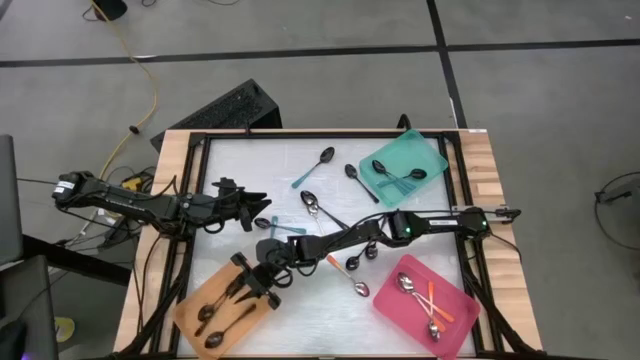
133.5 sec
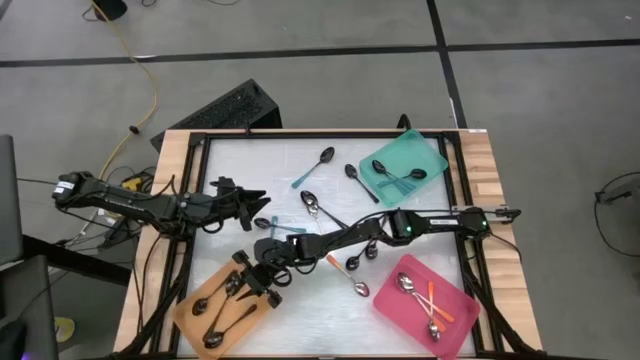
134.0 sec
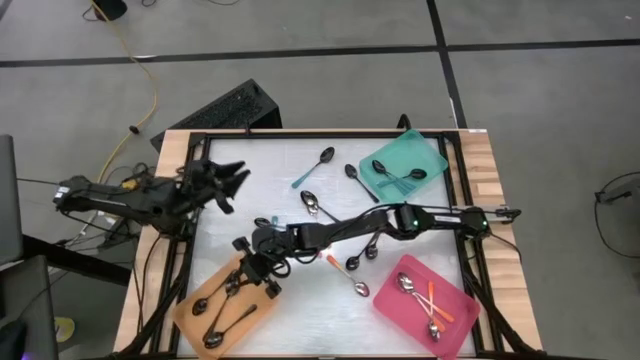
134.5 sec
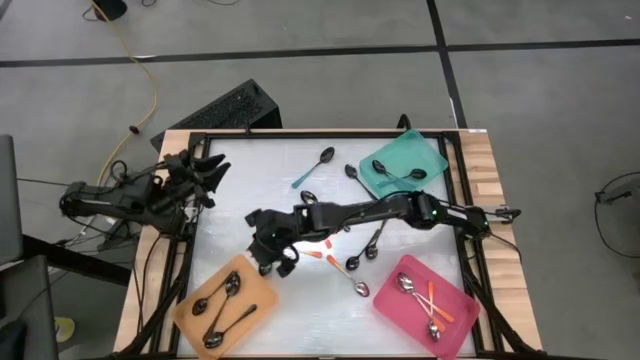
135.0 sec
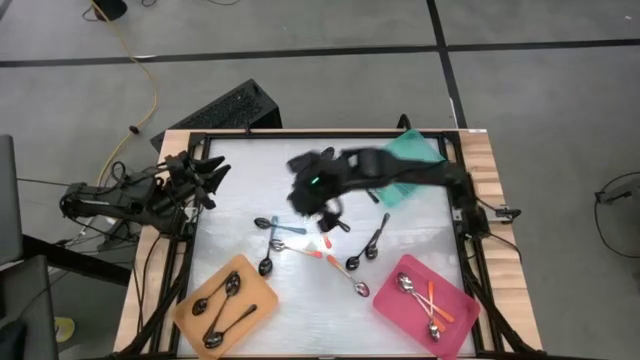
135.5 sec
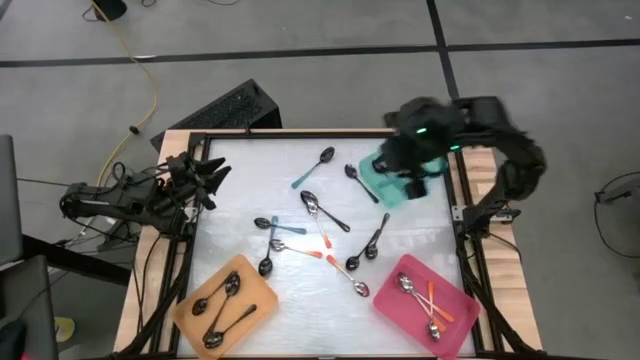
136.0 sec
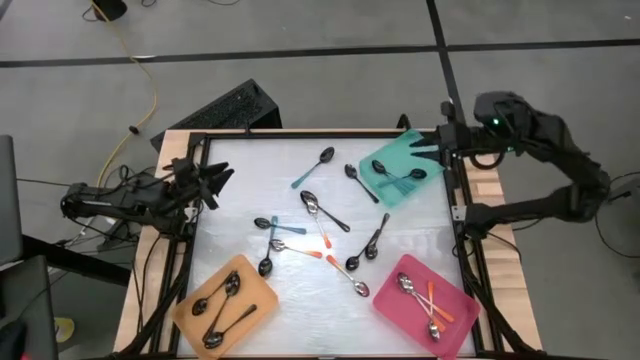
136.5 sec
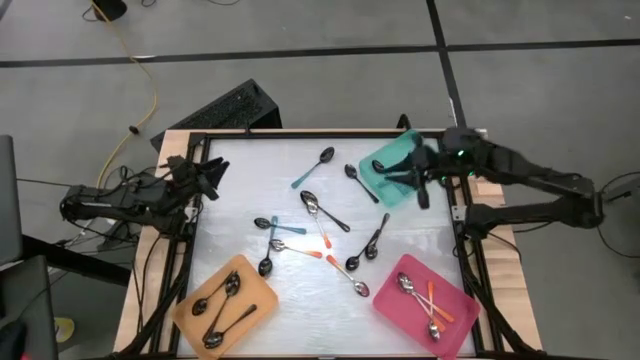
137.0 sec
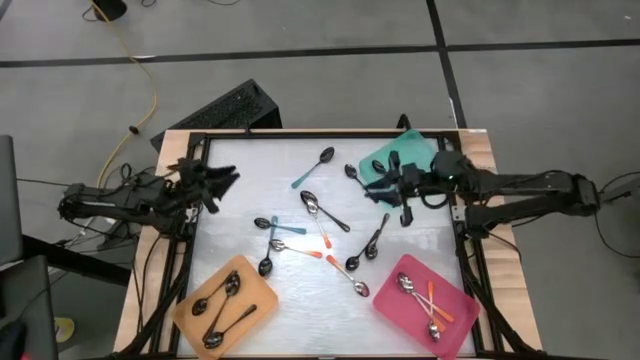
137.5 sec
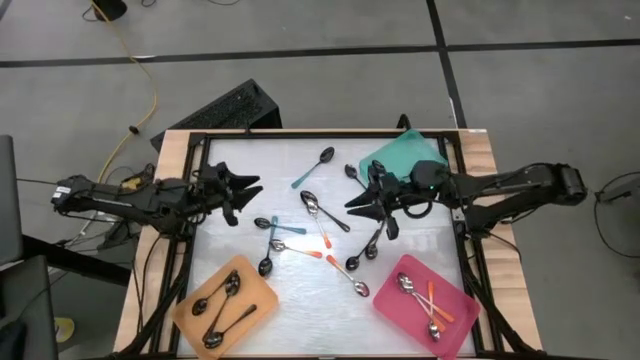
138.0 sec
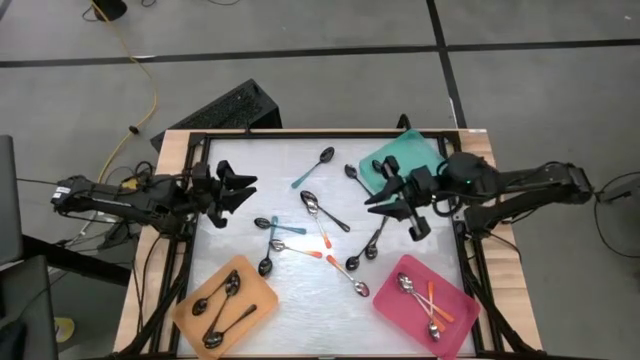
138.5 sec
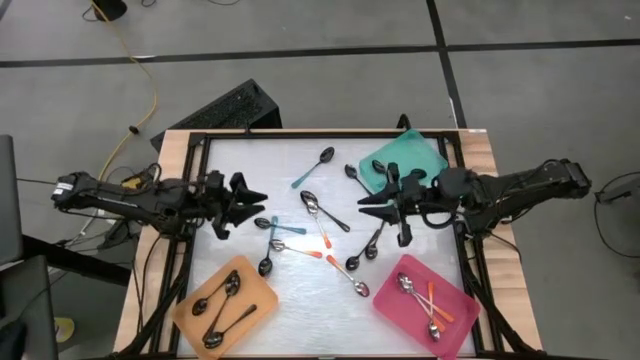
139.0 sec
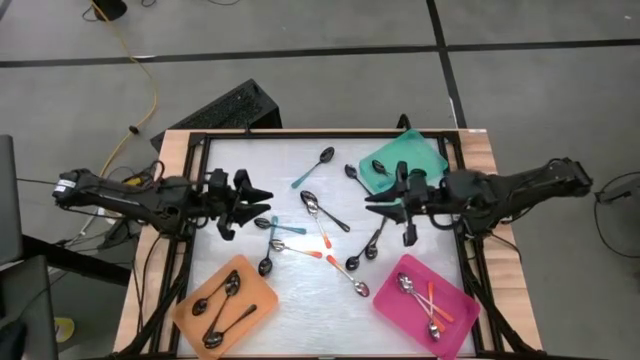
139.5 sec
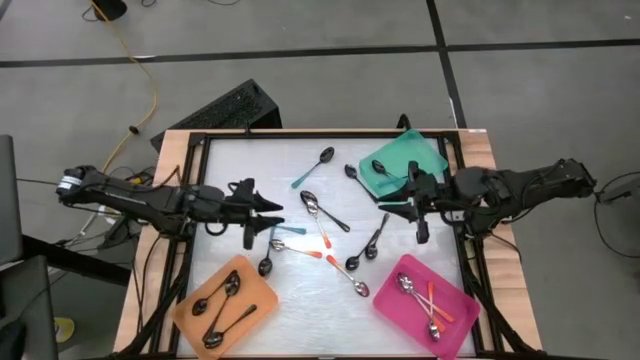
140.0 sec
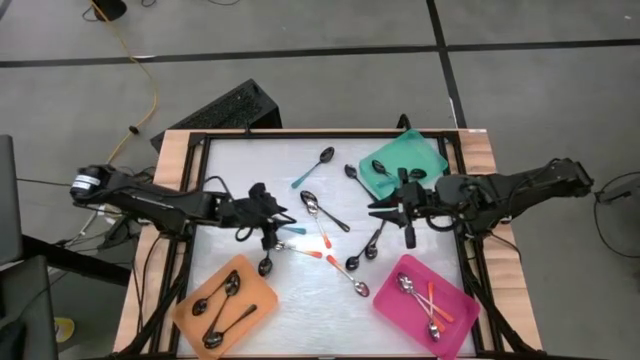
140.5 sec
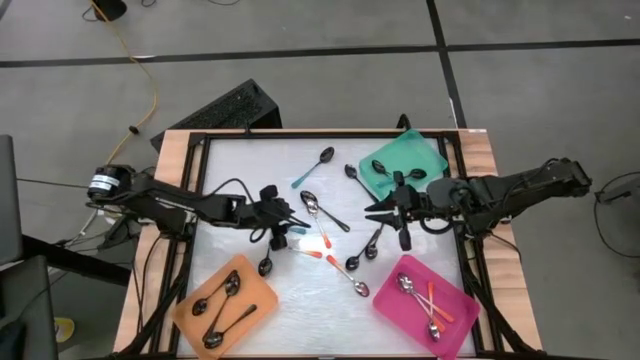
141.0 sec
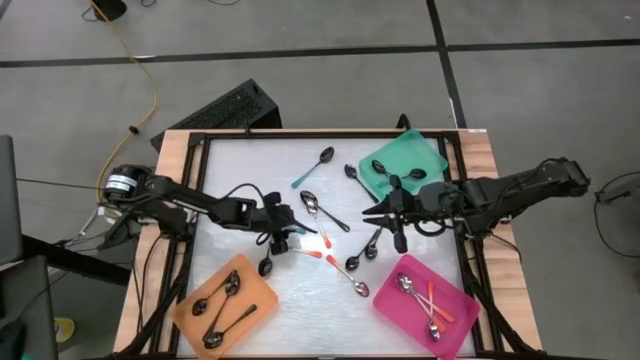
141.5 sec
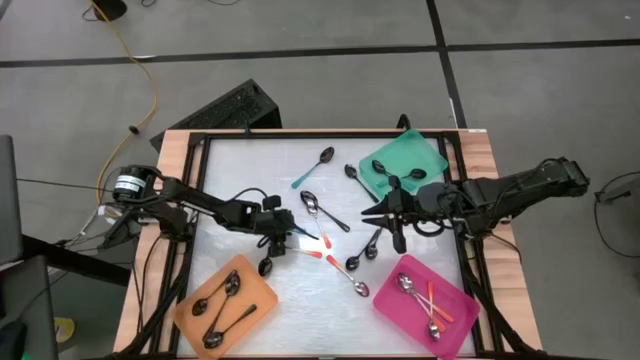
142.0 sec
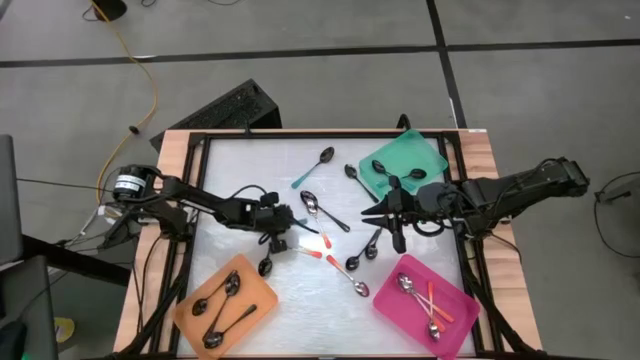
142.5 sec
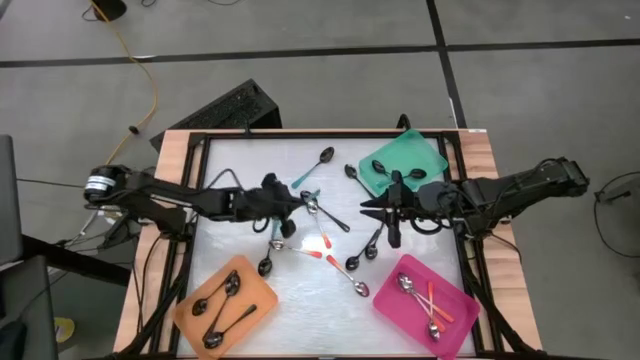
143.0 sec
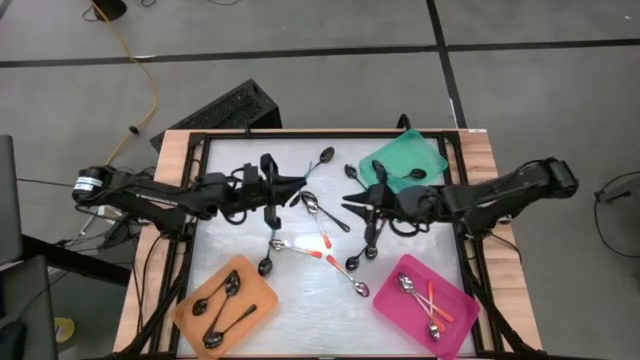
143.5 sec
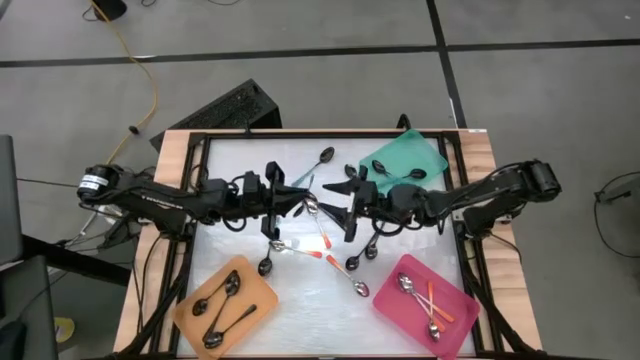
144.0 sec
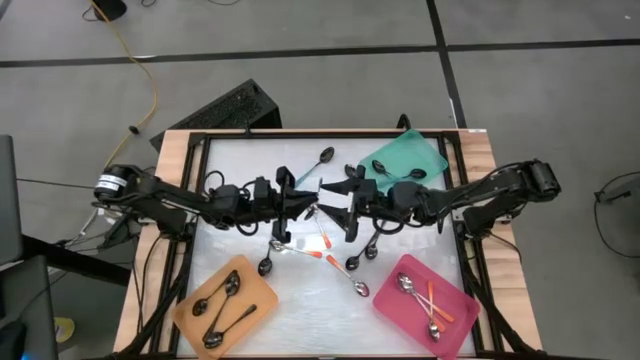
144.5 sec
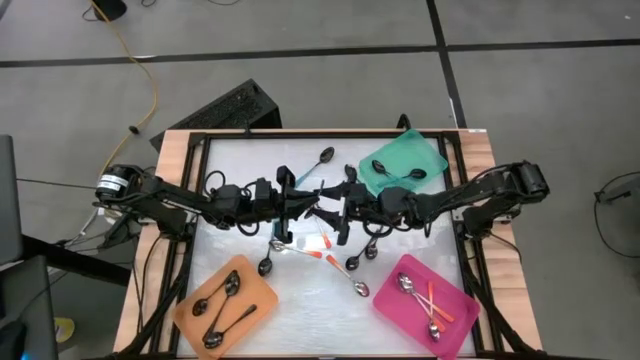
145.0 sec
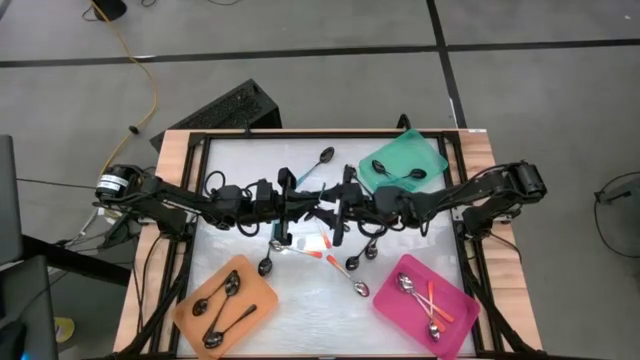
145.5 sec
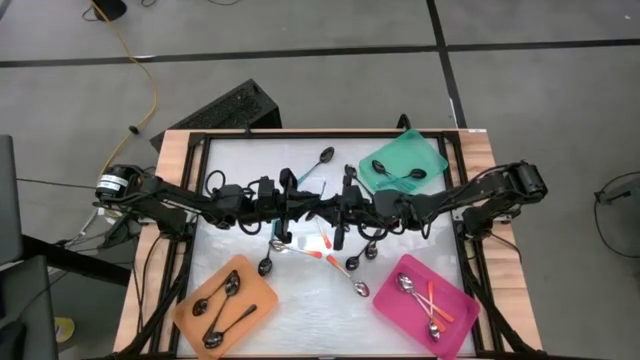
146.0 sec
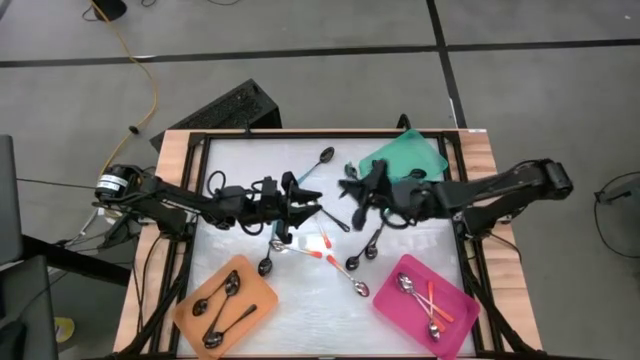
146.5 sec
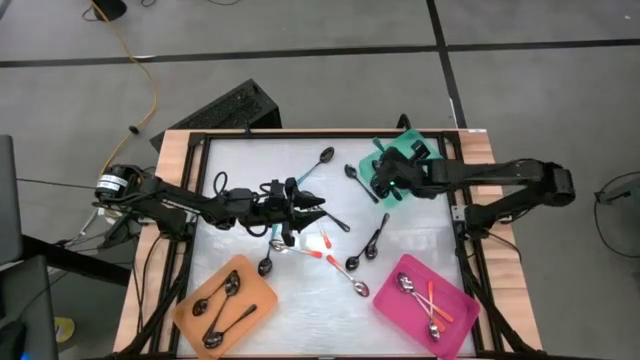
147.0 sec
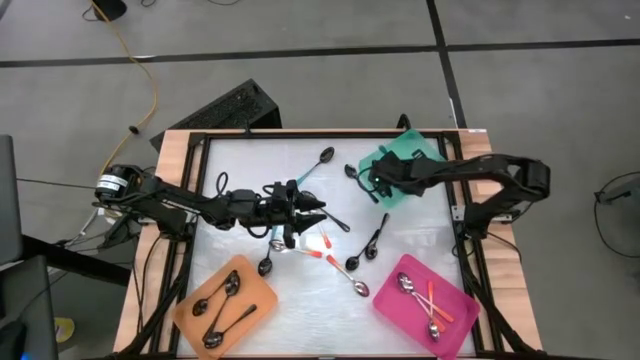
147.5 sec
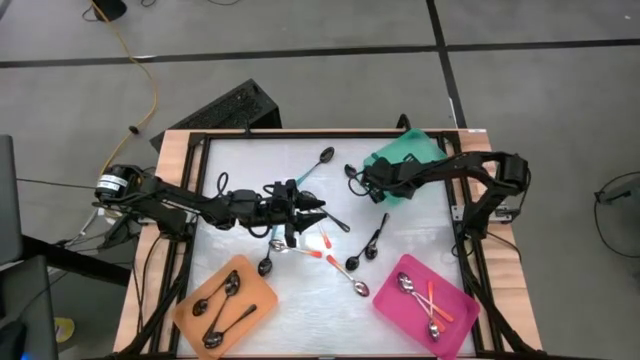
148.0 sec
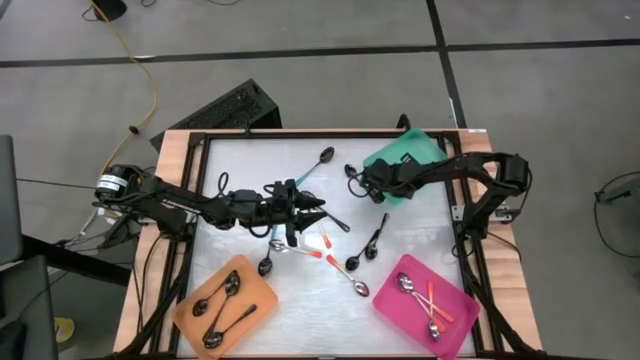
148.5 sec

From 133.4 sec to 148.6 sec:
Task: Sort silverware by color (type)
Put the blue spoon into the blue bin

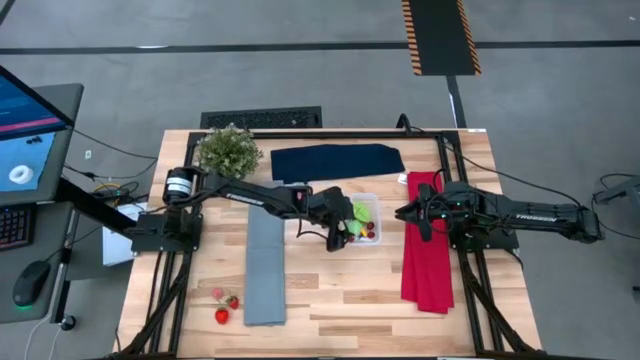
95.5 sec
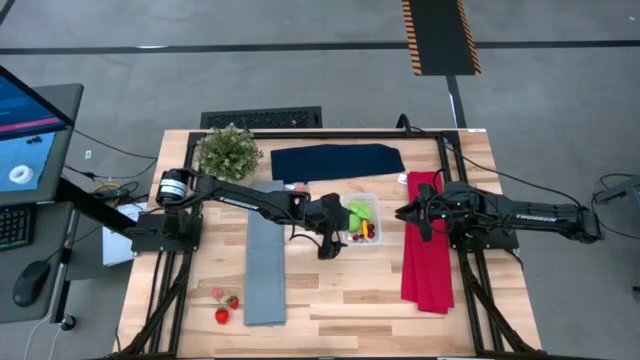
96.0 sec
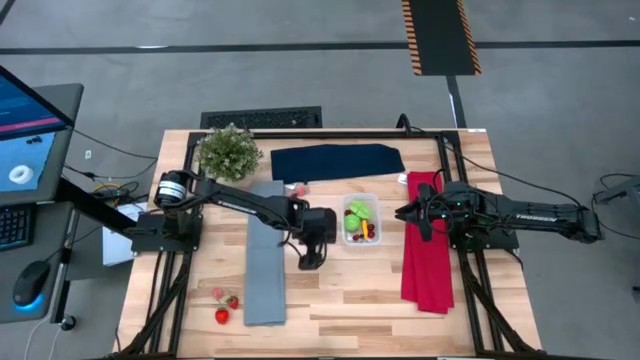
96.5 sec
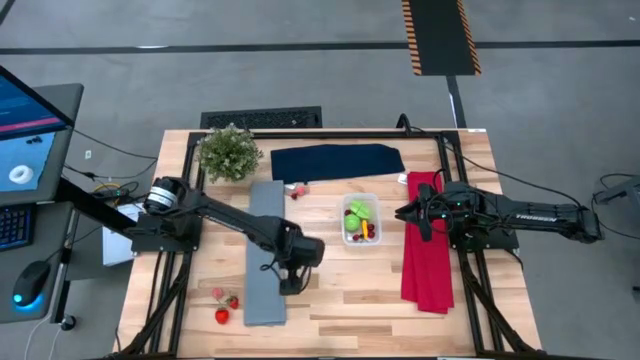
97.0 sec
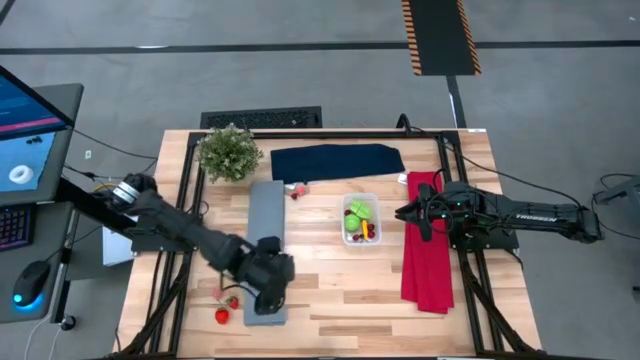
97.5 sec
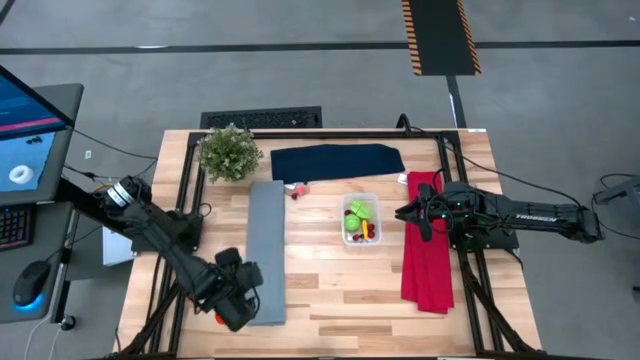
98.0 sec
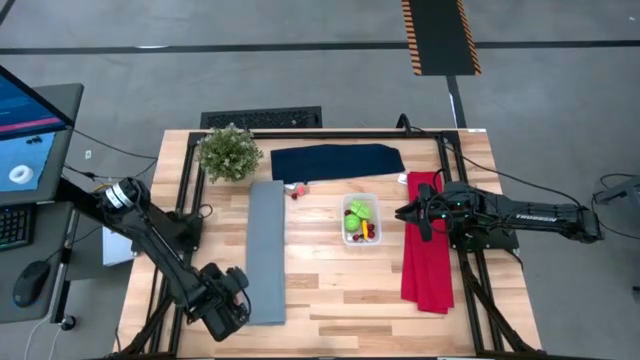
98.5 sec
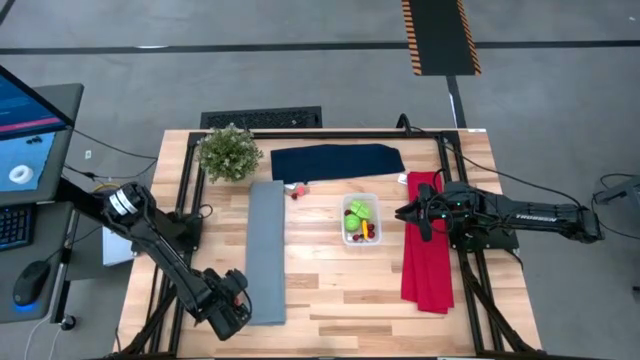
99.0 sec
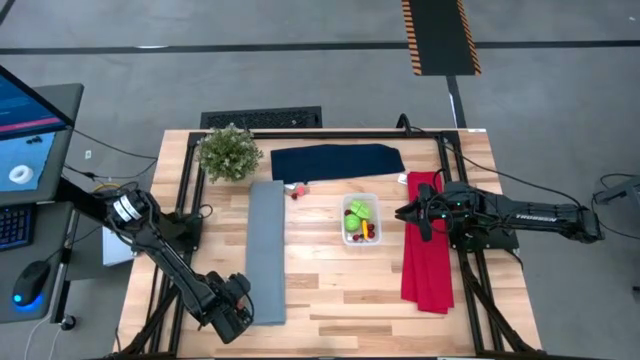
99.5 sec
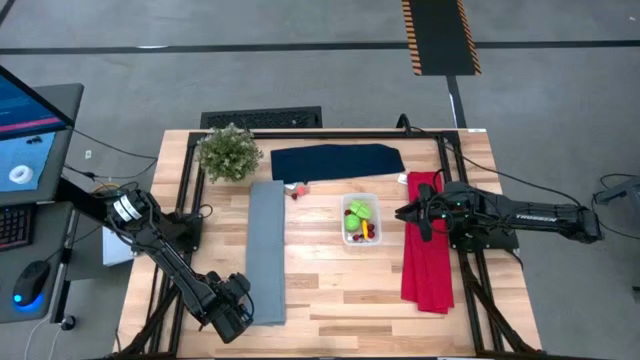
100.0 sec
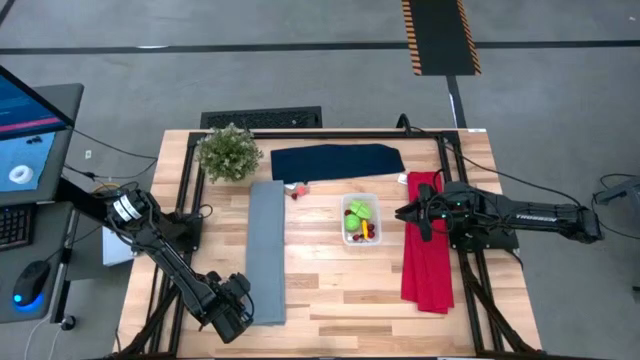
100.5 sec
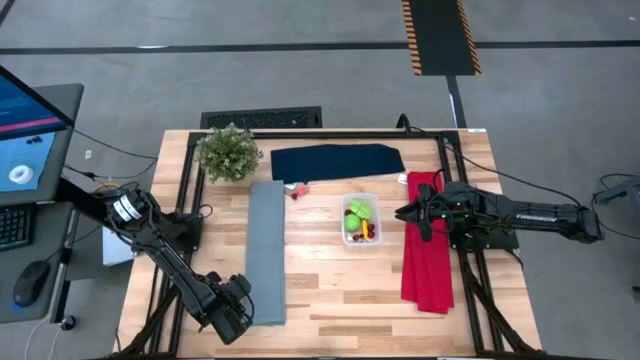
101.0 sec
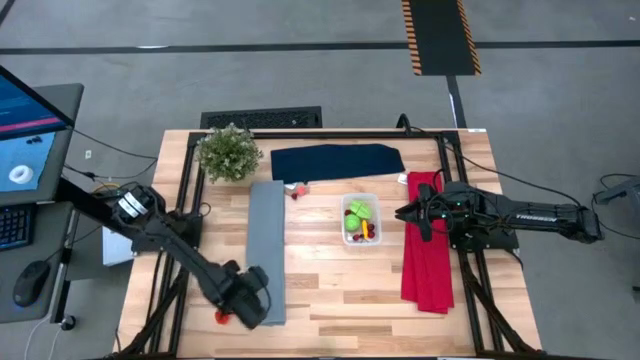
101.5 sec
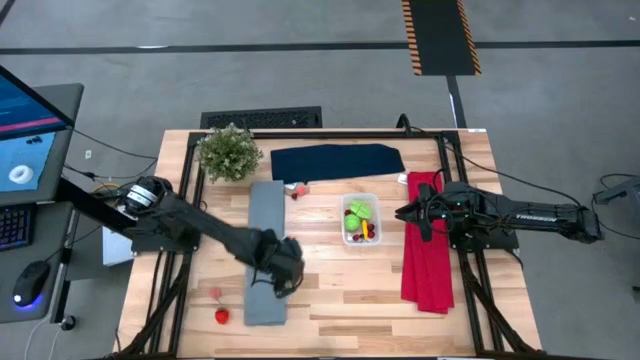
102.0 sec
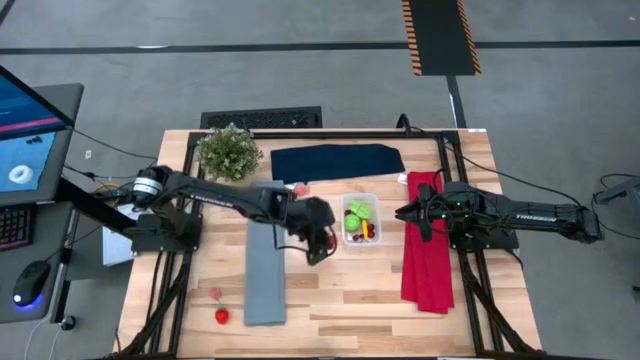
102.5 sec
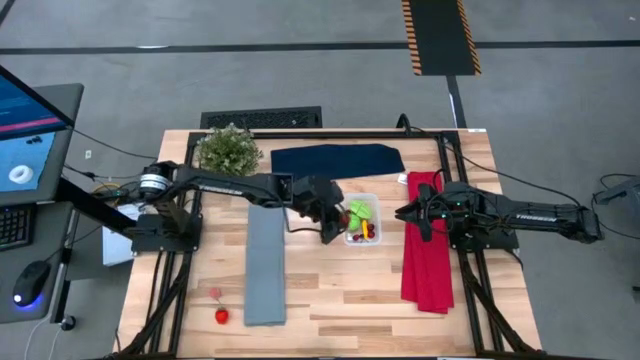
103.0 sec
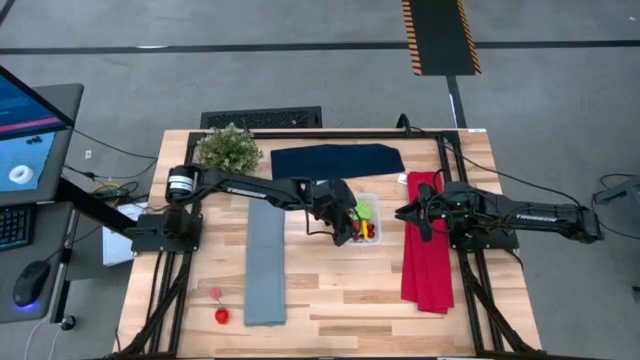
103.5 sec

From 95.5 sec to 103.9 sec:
Task: Pick and placing Produce into tupperware
Put the red strawberry into the transparent bin
